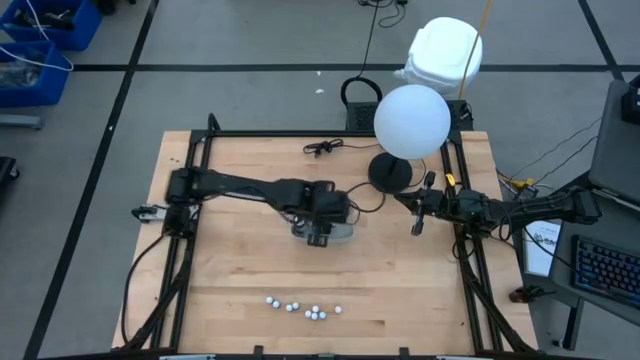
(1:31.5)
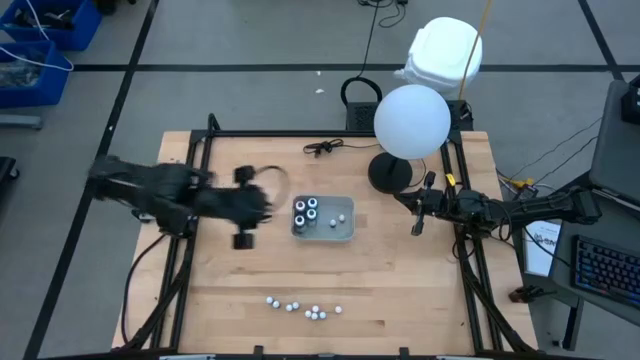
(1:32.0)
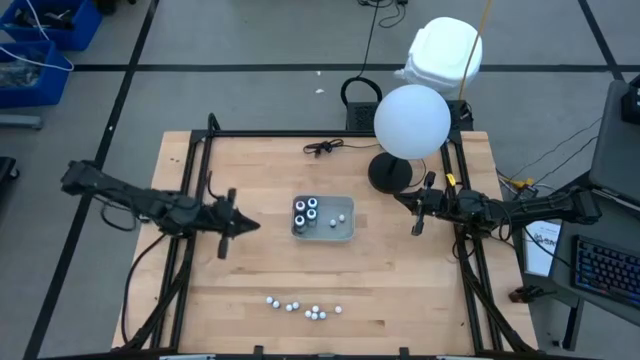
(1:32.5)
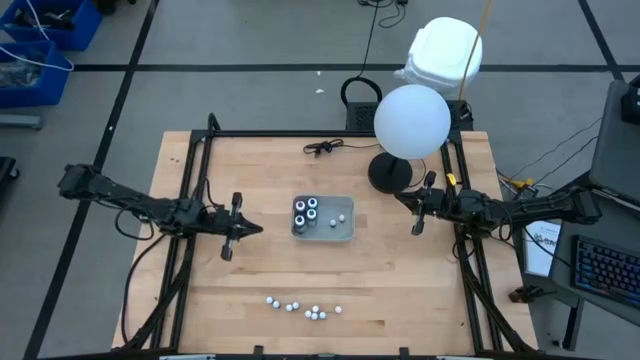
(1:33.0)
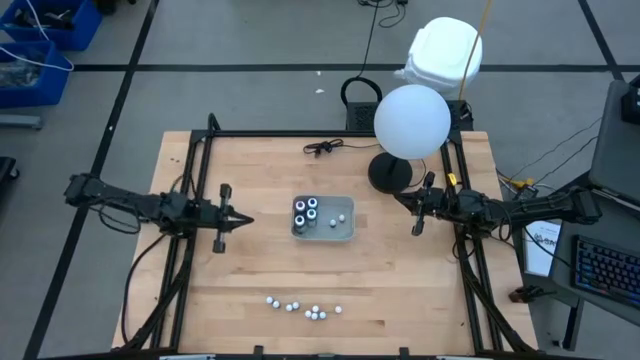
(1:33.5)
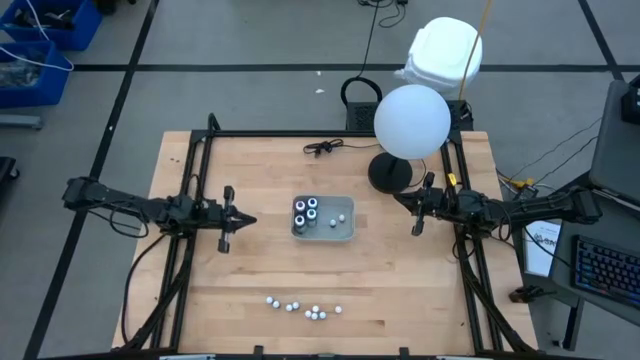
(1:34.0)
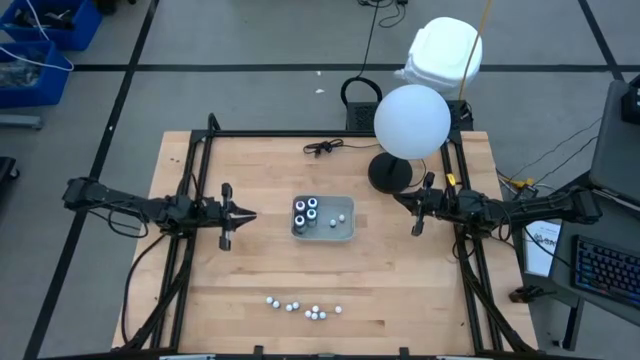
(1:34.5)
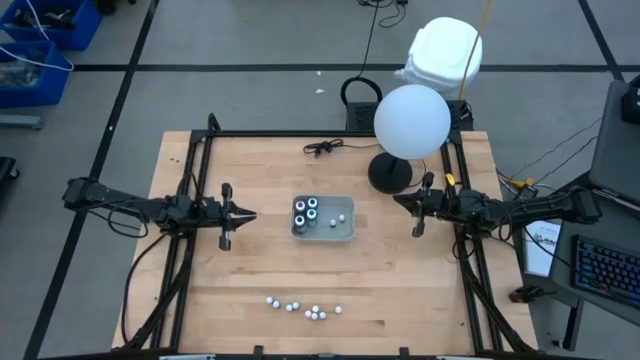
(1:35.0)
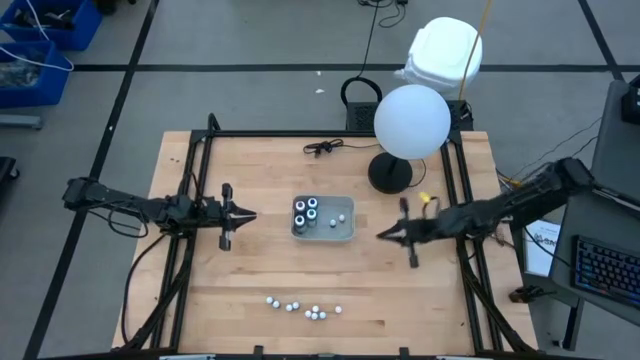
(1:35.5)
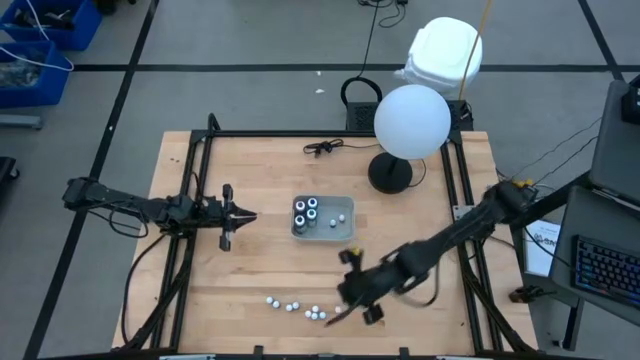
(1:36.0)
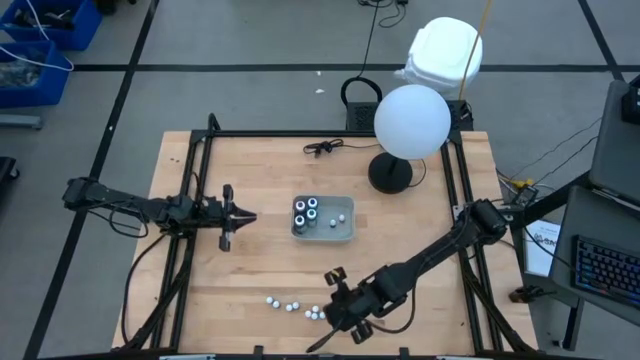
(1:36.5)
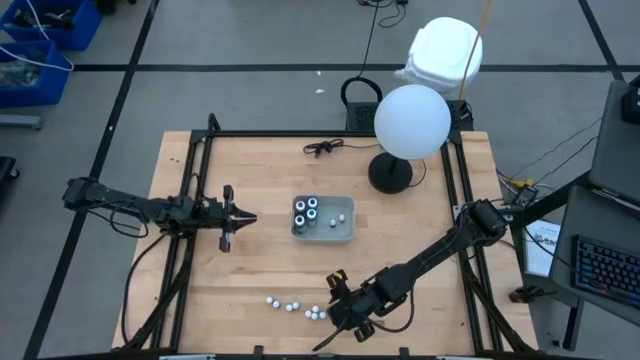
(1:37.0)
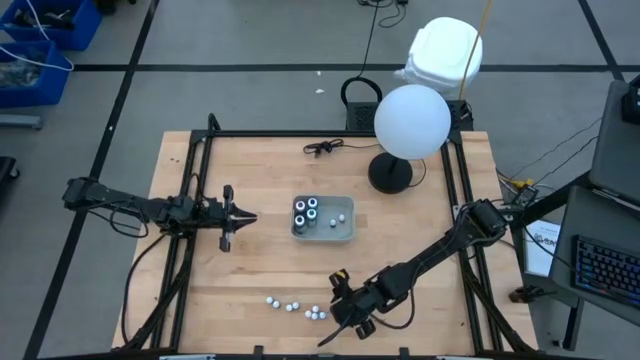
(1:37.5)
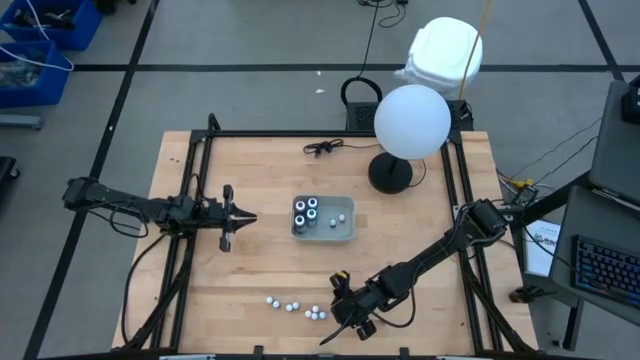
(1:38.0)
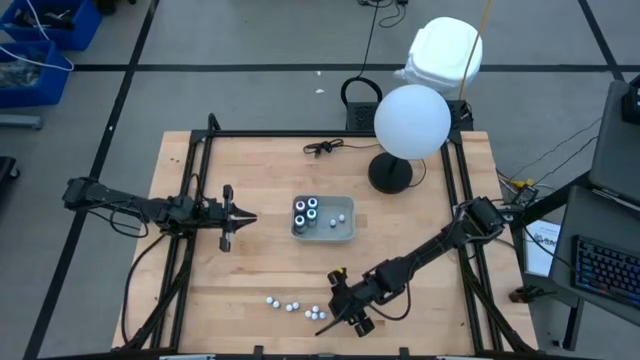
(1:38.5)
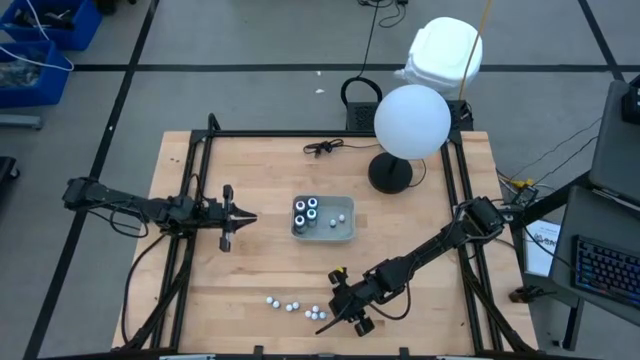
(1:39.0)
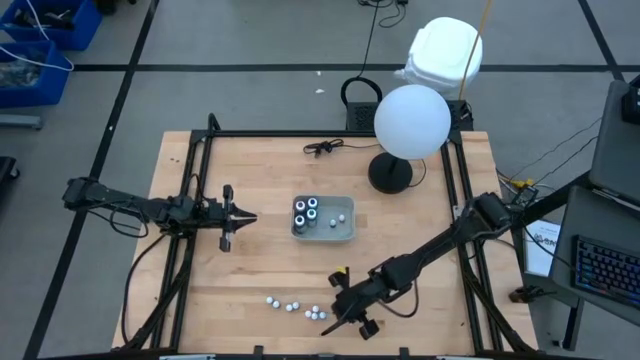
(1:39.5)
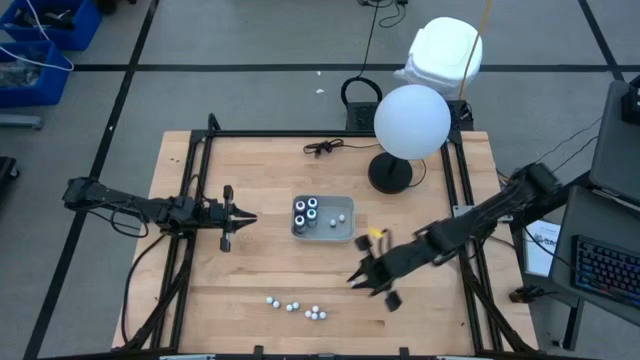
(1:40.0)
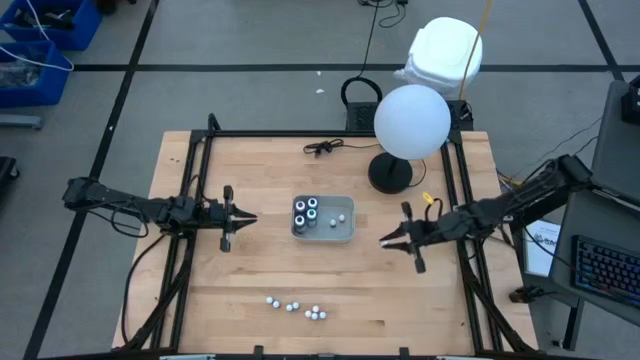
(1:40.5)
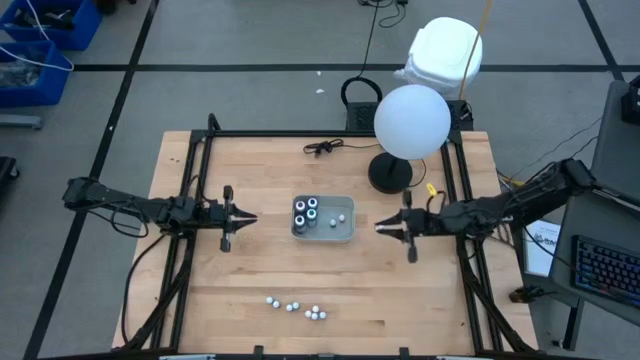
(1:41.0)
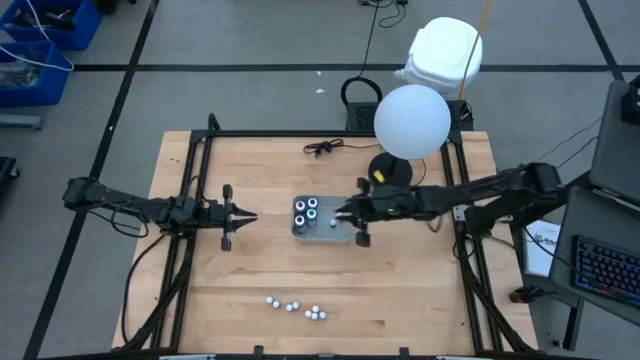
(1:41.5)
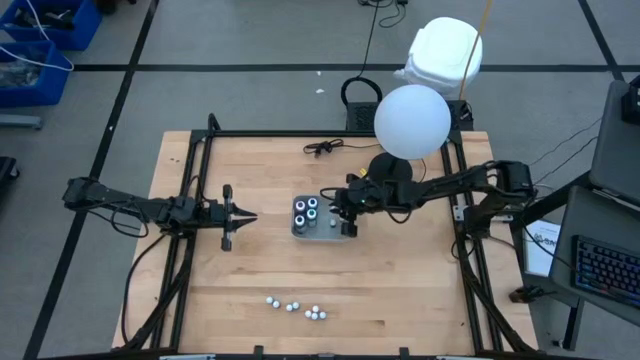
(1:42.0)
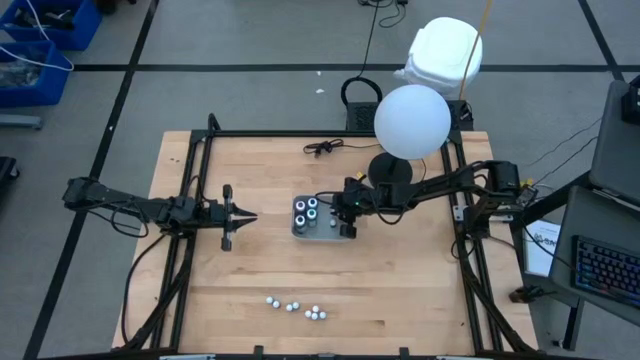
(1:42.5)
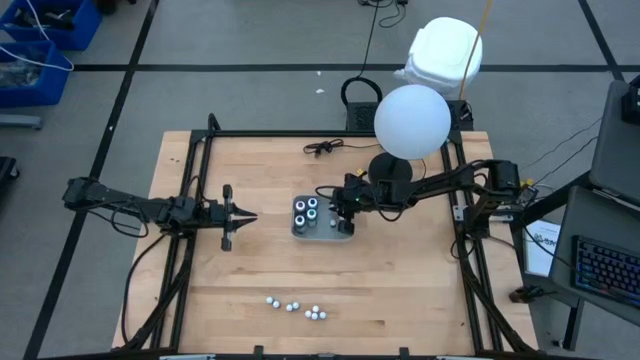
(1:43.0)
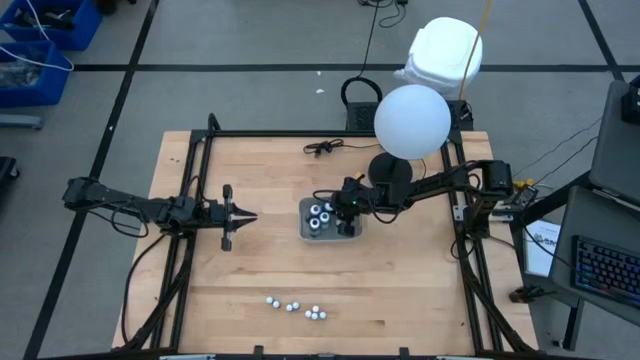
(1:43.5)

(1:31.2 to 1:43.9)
Task: Pick & Place food coloring
Put the right small yellow food coloring bottle into the gray bin

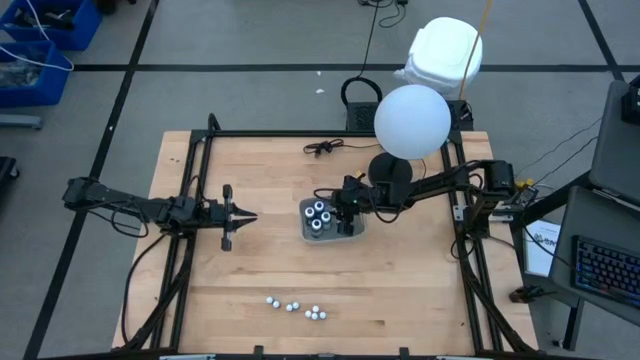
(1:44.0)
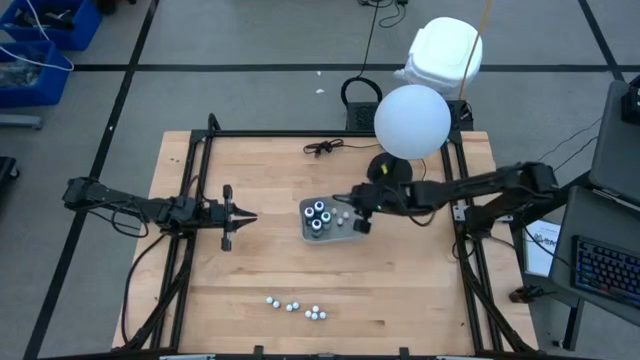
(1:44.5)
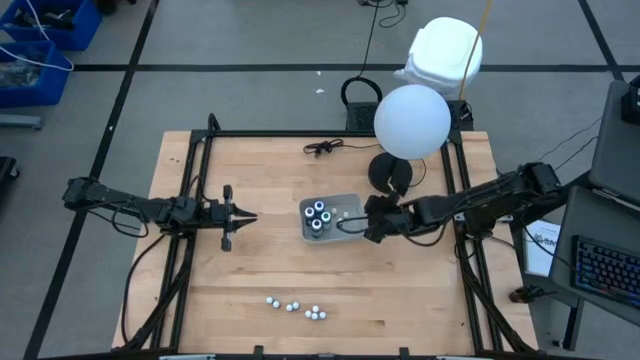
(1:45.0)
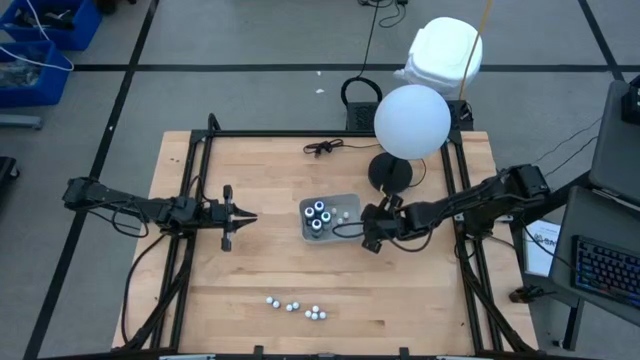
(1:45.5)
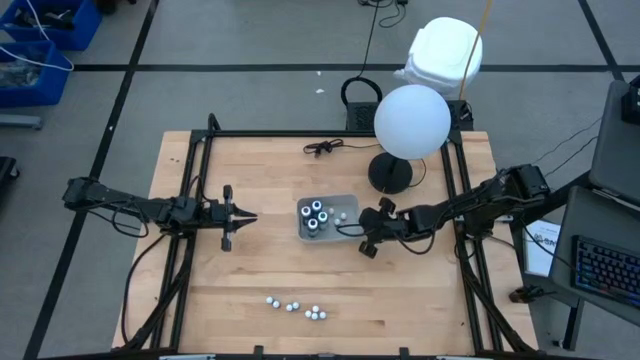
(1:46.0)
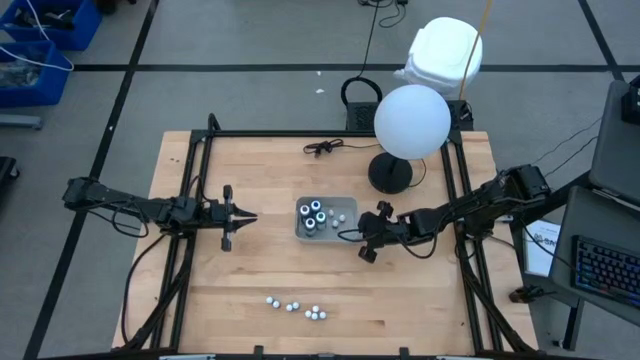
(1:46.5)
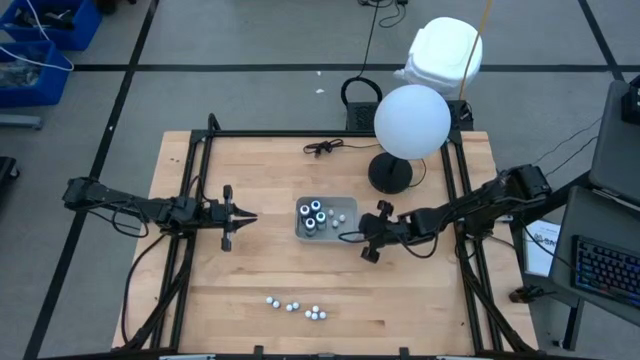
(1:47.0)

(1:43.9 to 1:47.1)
Adjust the gray bin on the table

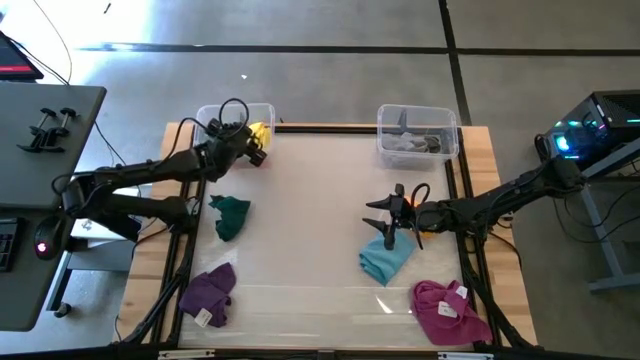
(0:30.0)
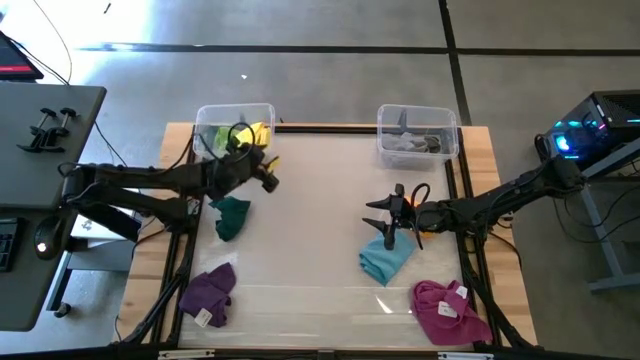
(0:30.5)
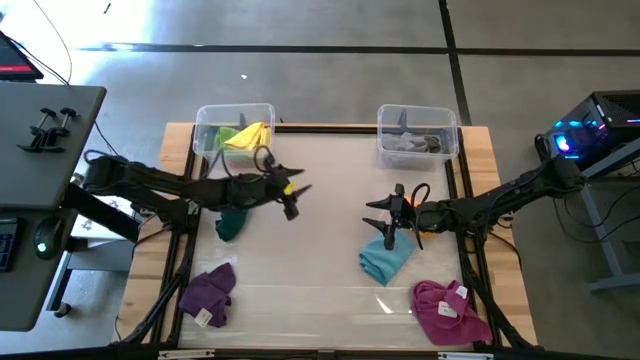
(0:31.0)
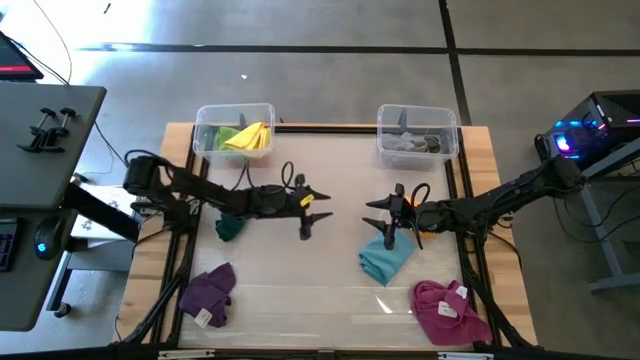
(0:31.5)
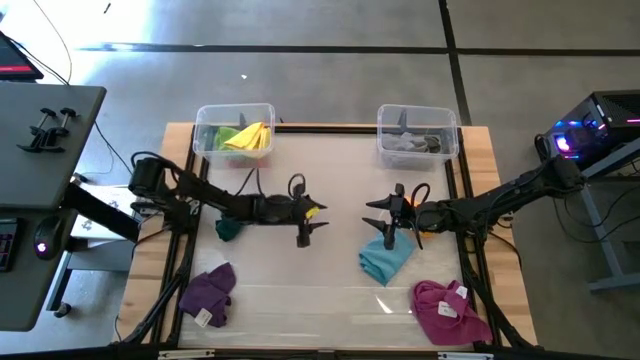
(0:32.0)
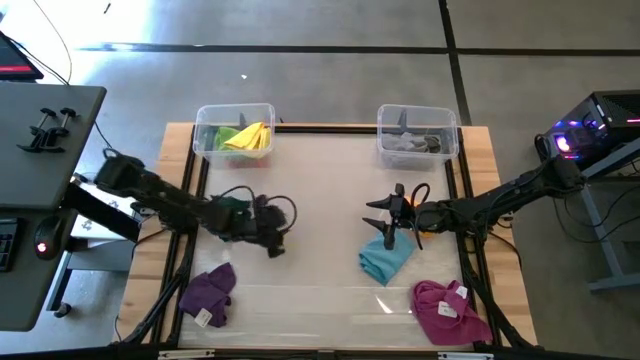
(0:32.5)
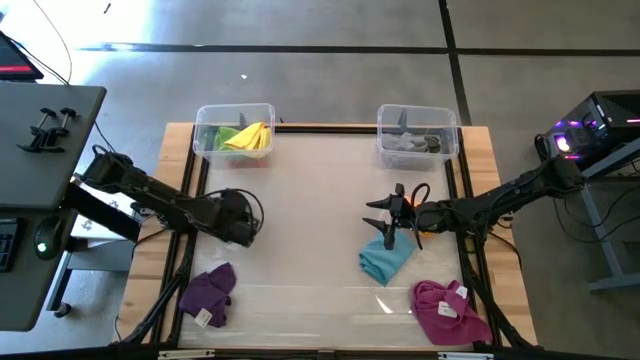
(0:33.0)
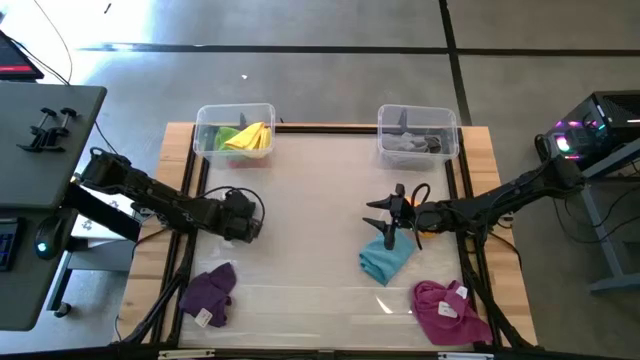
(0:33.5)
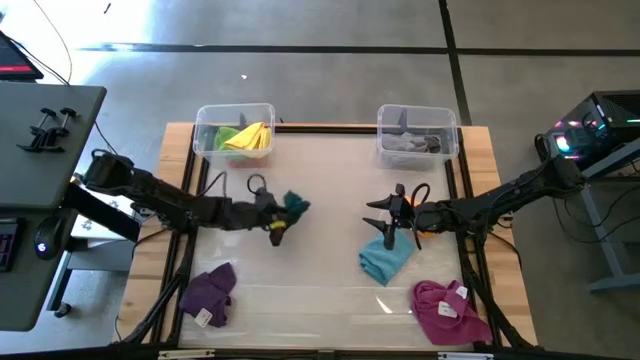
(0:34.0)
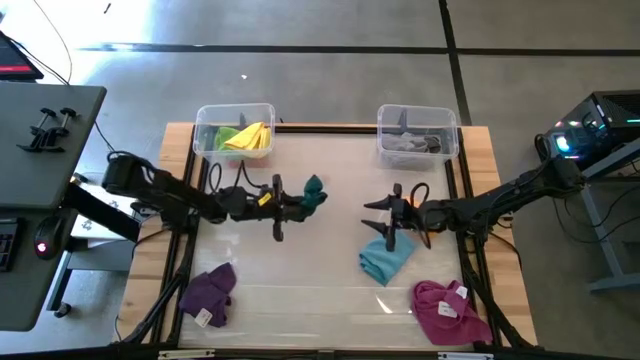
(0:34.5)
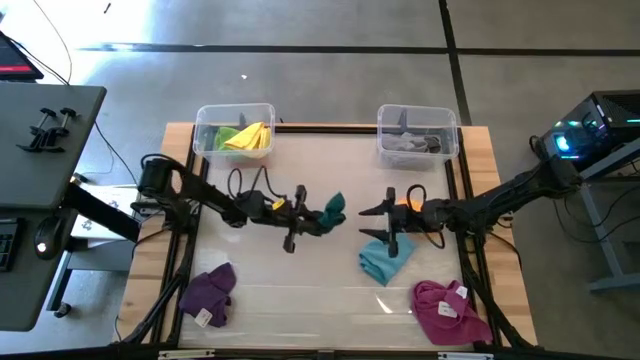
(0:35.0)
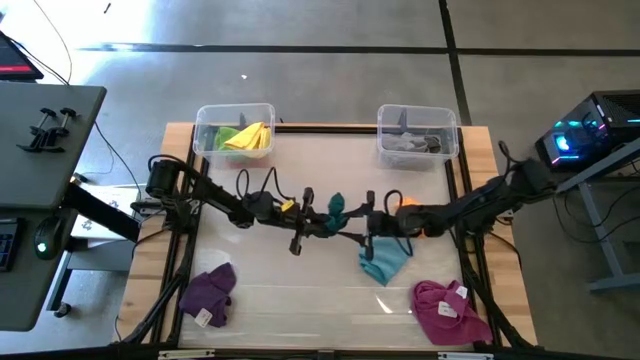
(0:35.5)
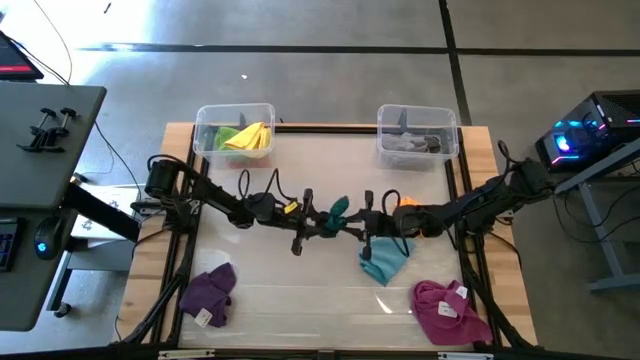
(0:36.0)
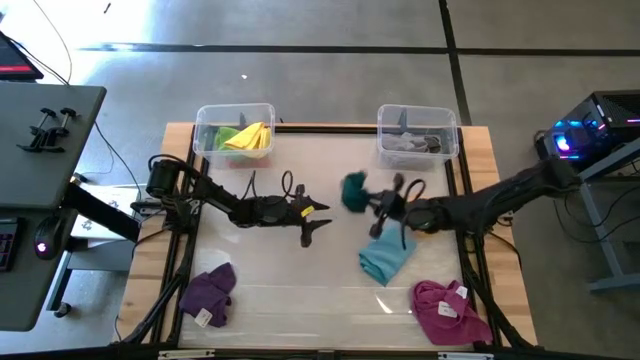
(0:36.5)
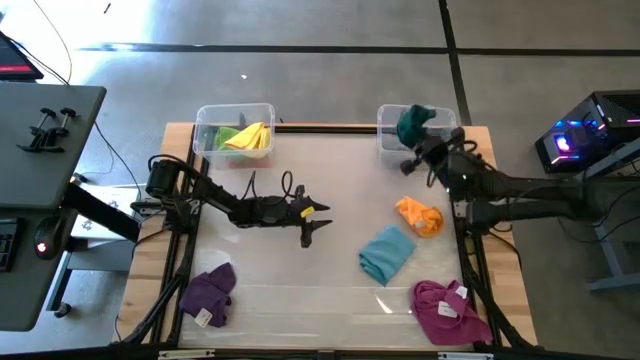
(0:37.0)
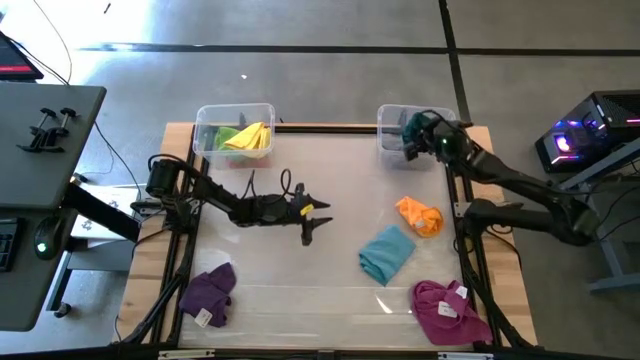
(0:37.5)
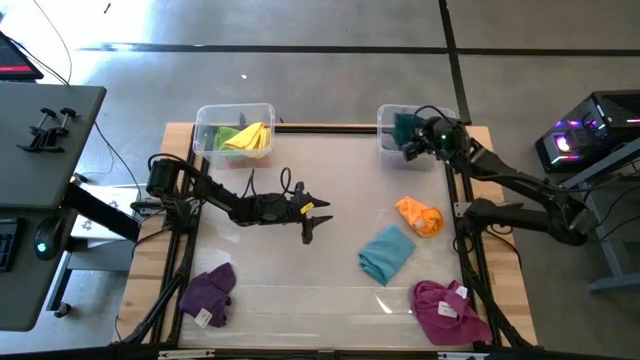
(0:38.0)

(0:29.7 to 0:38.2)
Task: Sort towels by color in basket
Put the dark green microfiber cloth into the right transparent bin
